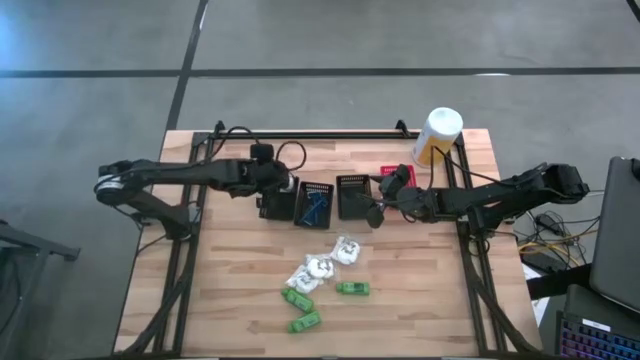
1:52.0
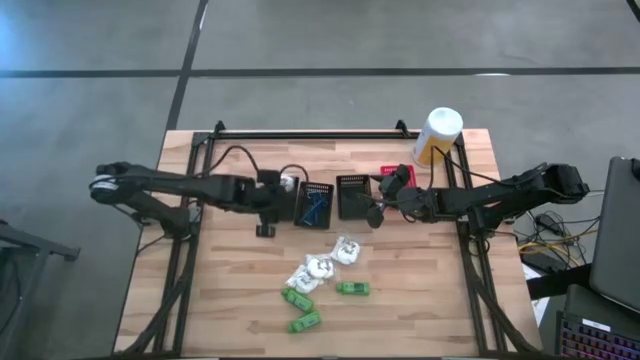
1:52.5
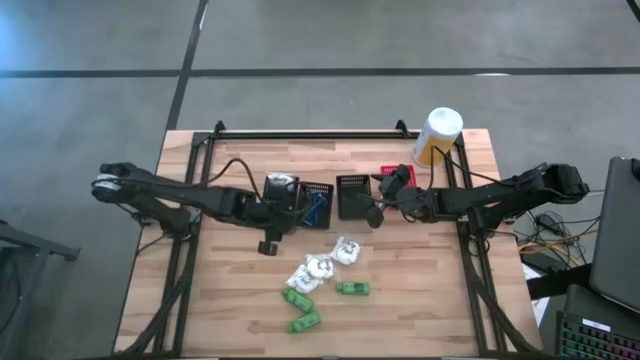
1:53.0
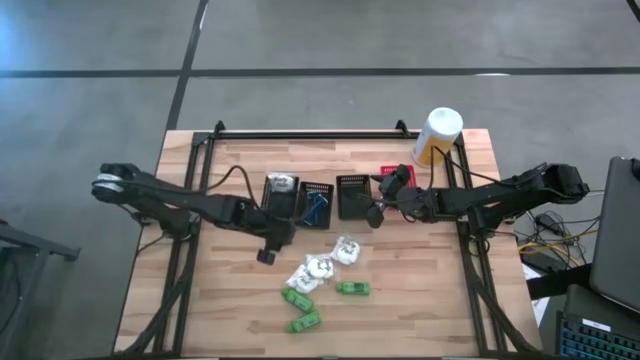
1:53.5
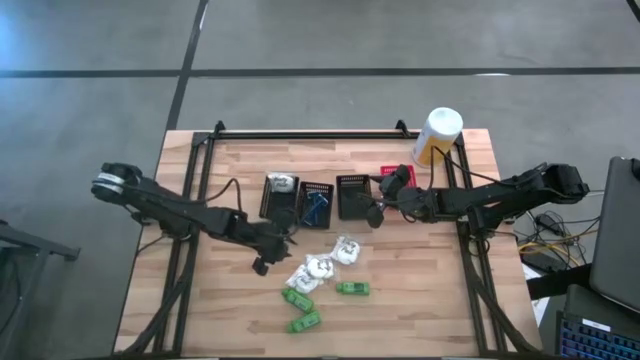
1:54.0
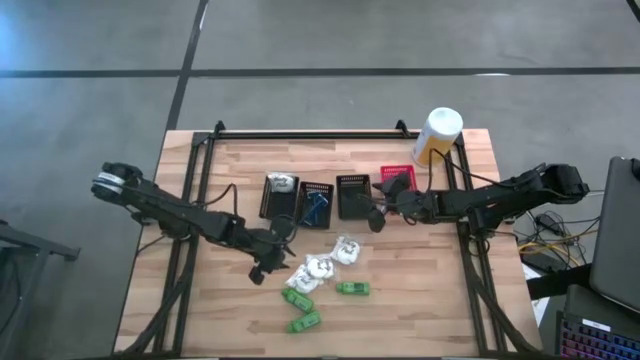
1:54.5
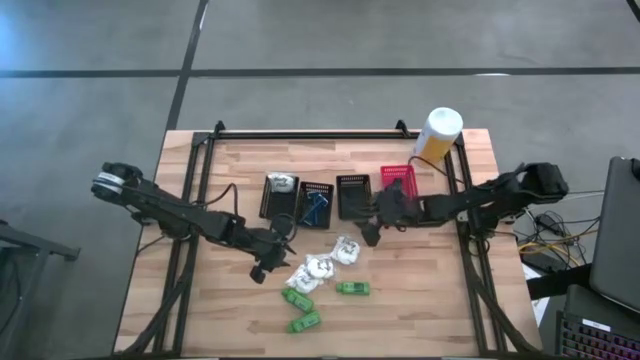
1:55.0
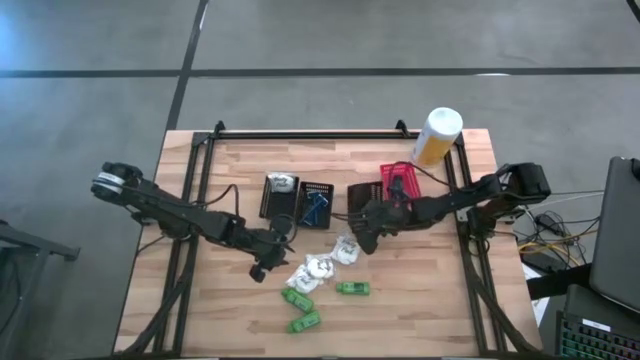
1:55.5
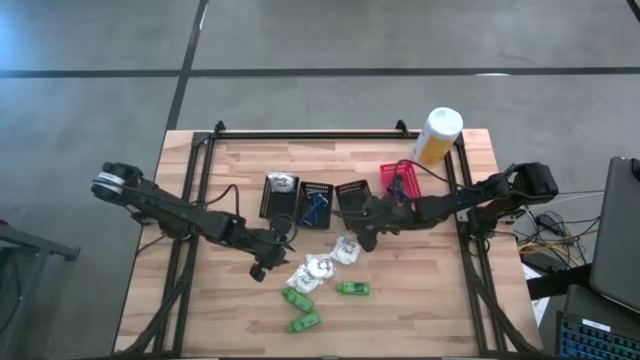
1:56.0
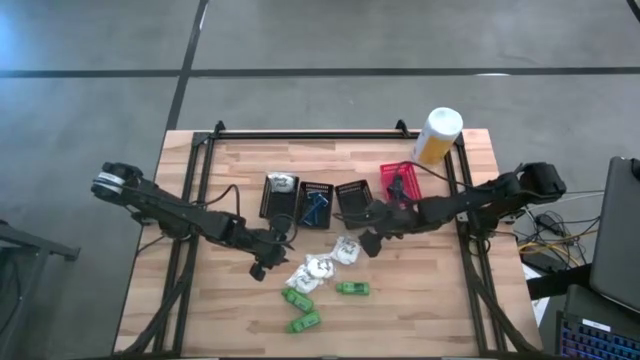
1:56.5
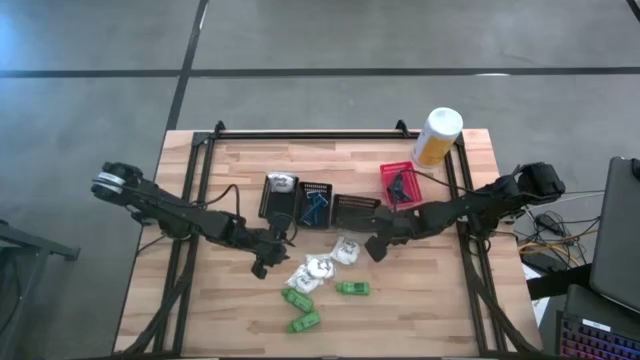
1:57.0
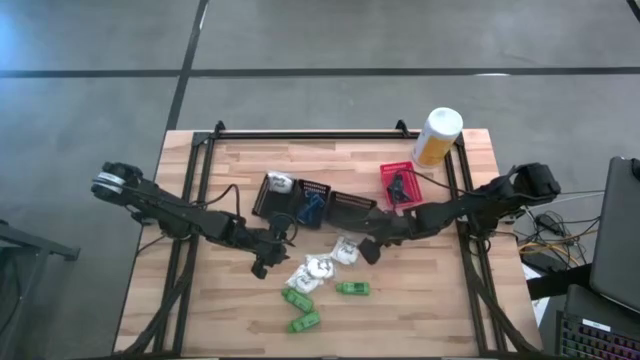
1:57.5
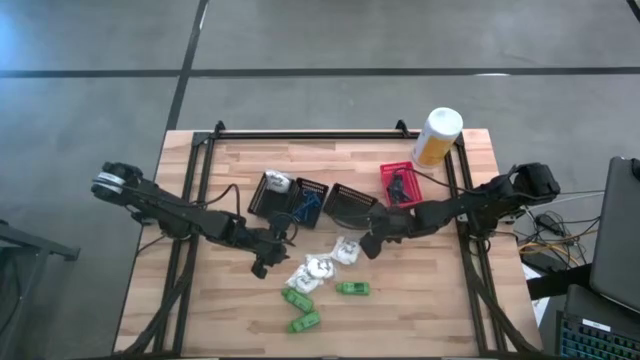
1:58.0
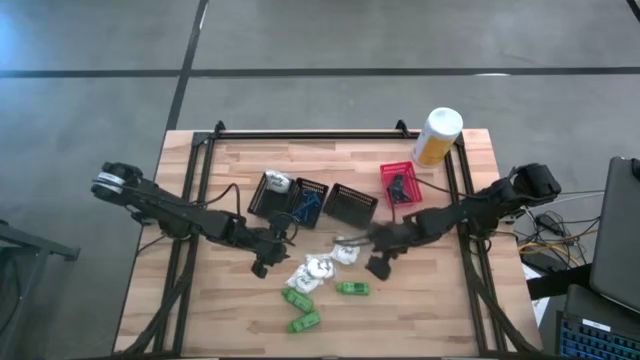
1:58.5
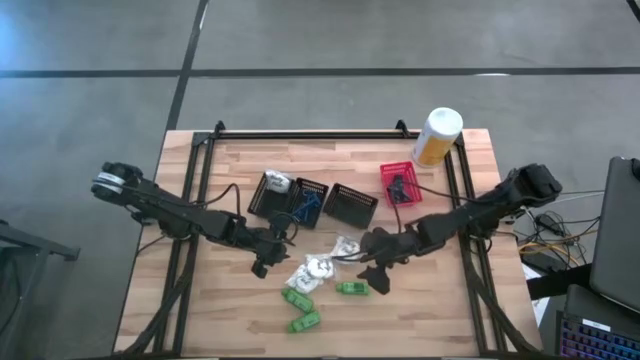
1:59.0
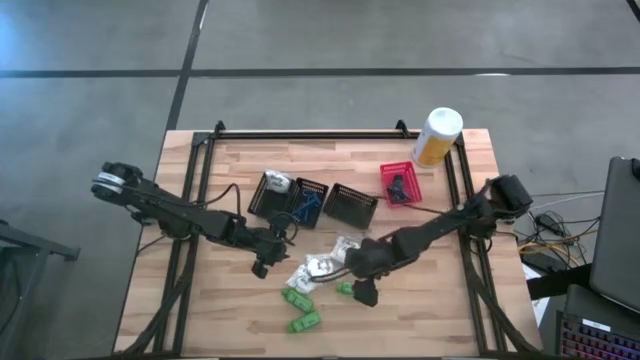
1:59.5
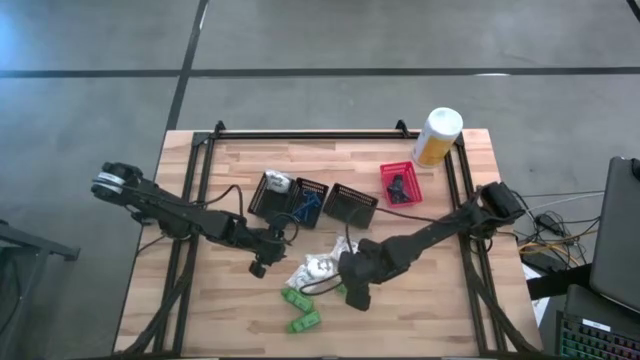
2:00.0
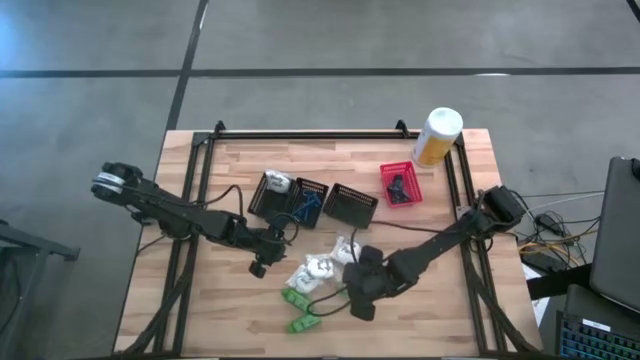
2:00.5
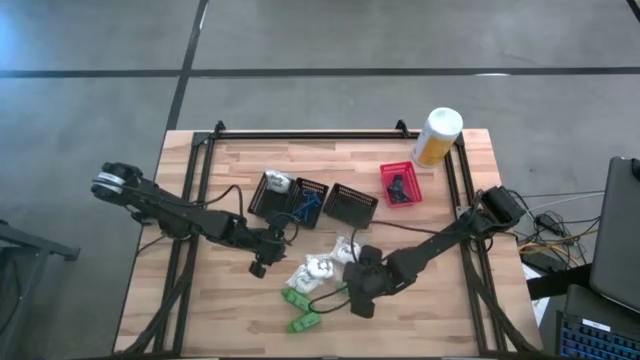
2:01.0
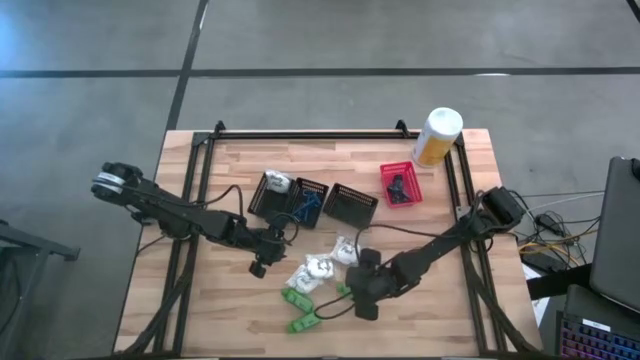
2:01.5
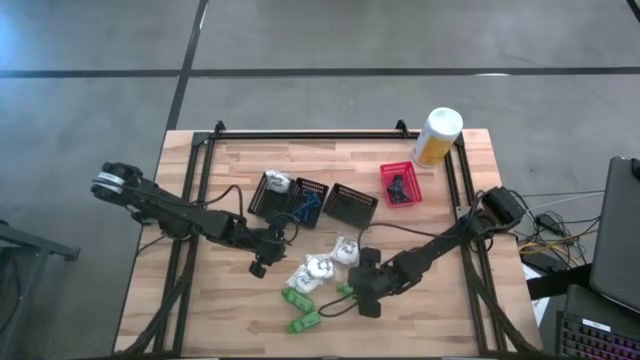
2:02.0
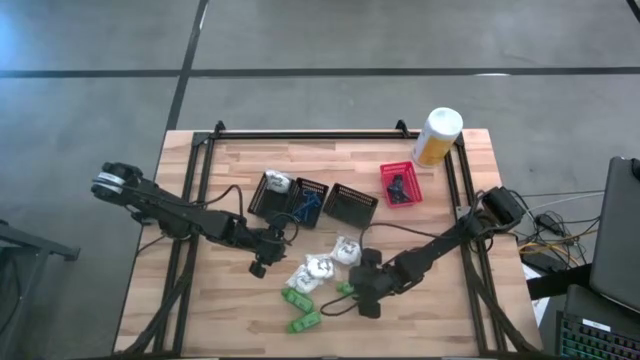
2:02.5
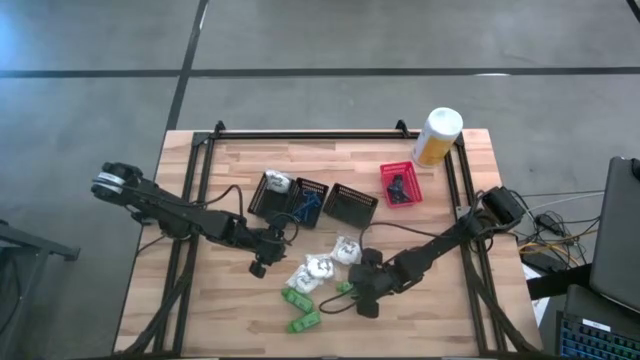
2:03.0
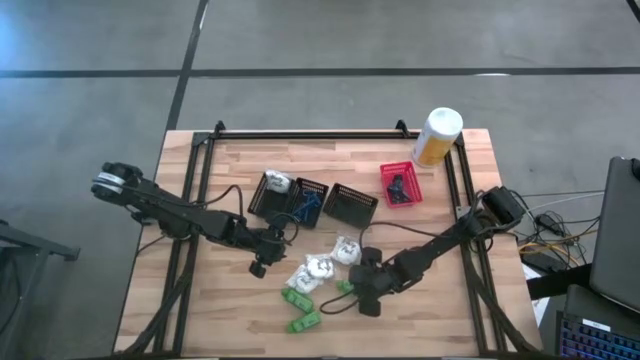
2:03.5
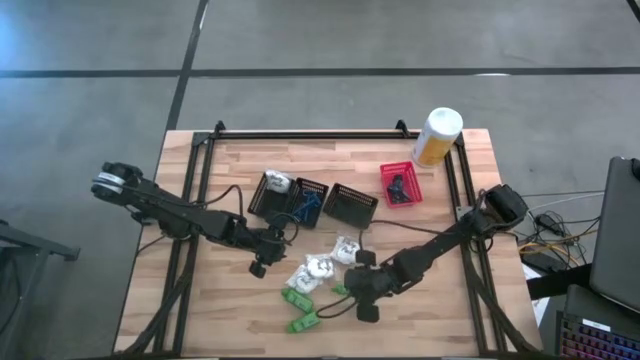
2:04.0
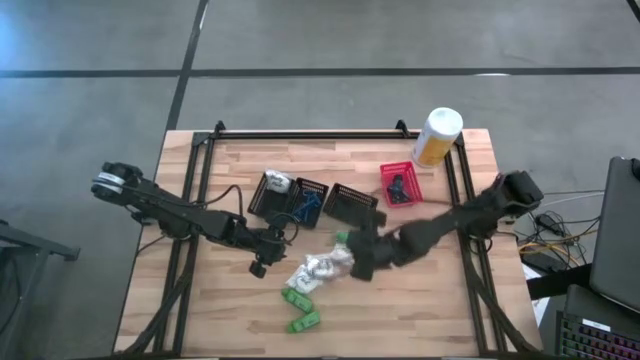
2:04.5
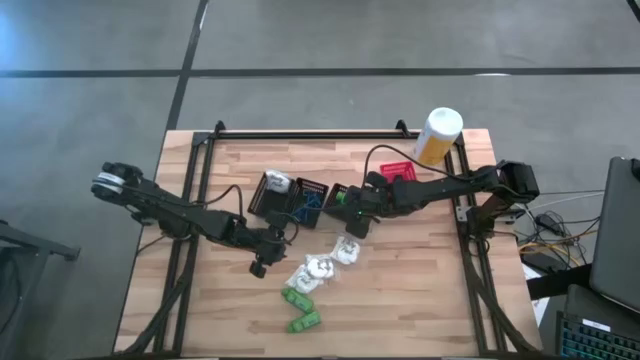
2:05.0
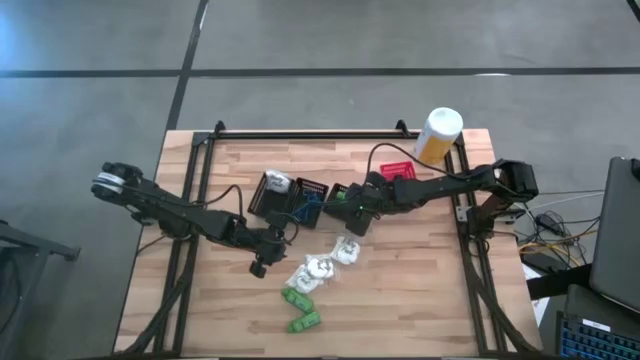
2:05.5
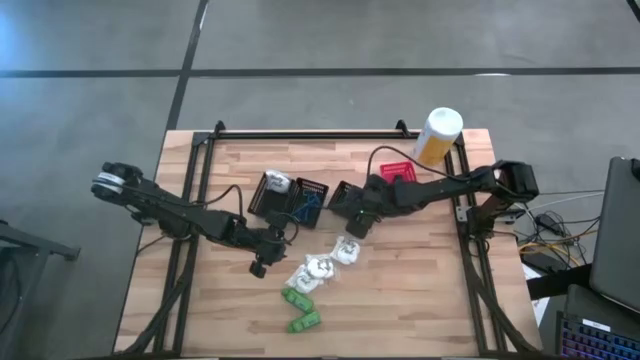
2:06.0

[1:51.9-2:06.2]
Task: Pick & Place Travel size toiletries
Put the right green shampoo into the right black bin

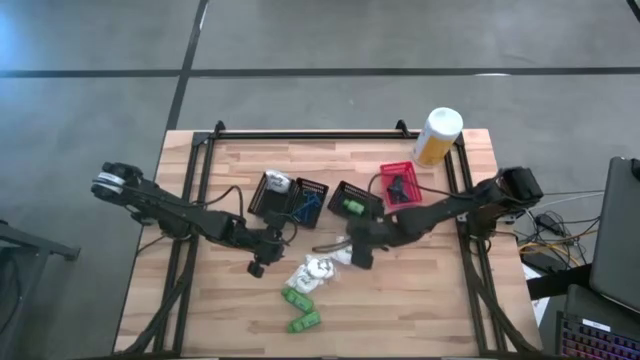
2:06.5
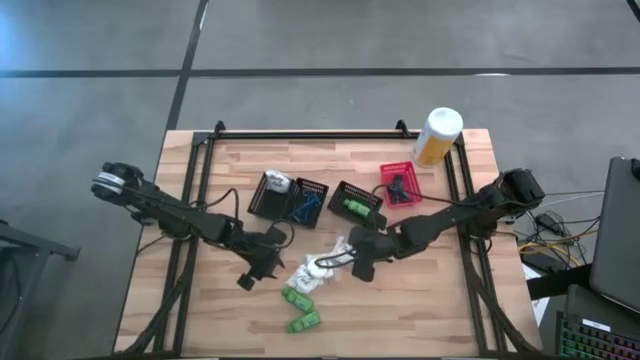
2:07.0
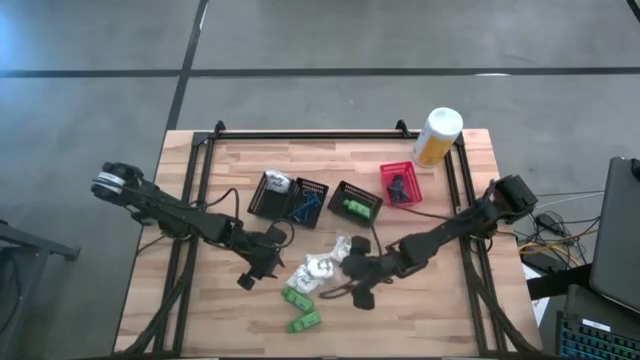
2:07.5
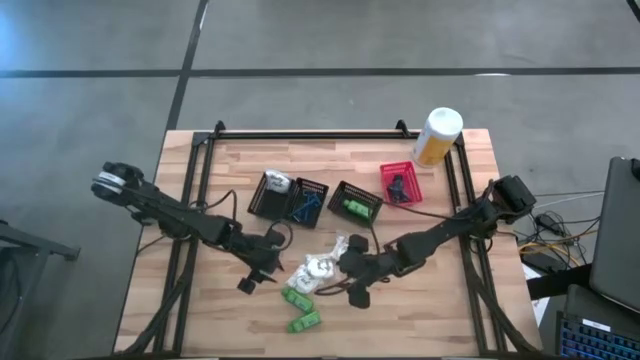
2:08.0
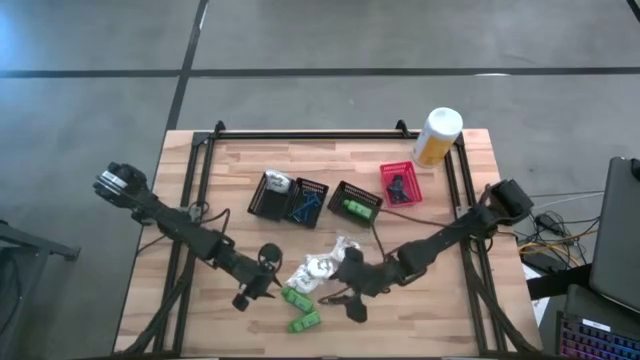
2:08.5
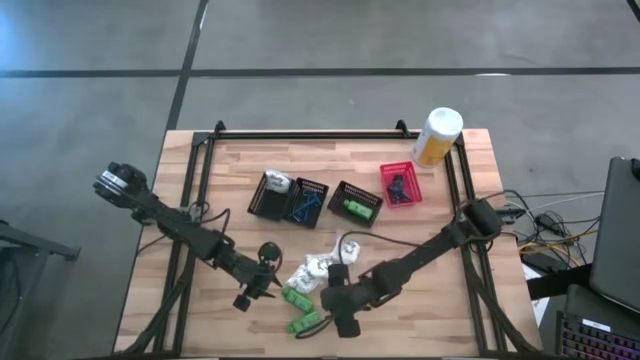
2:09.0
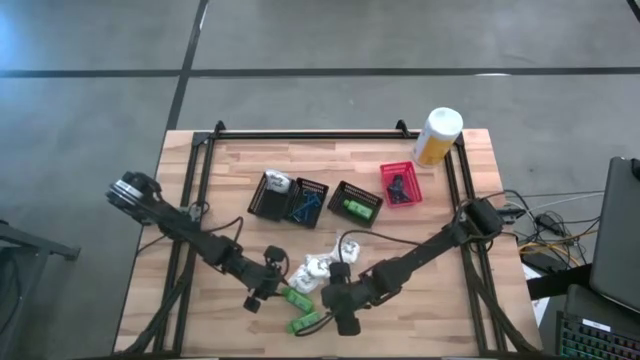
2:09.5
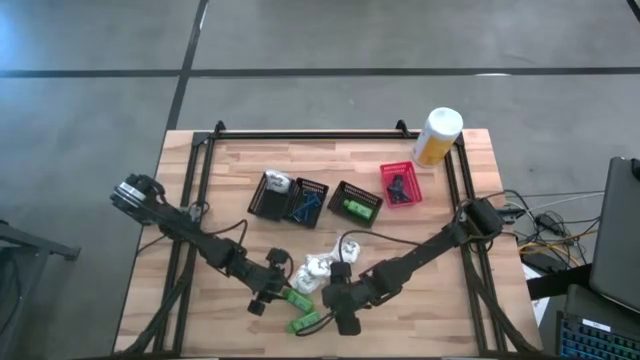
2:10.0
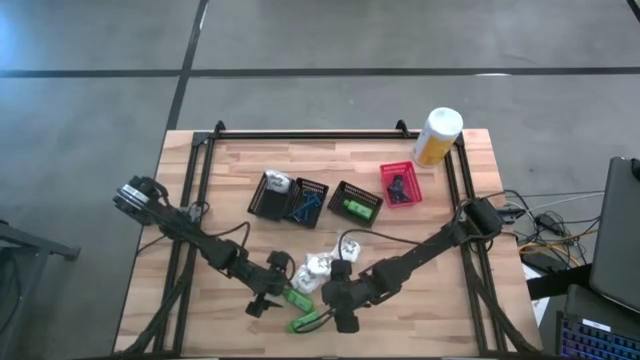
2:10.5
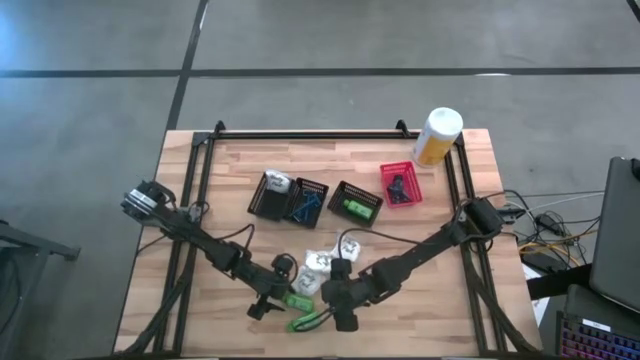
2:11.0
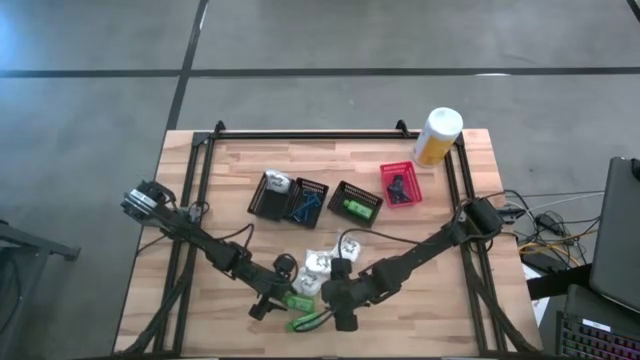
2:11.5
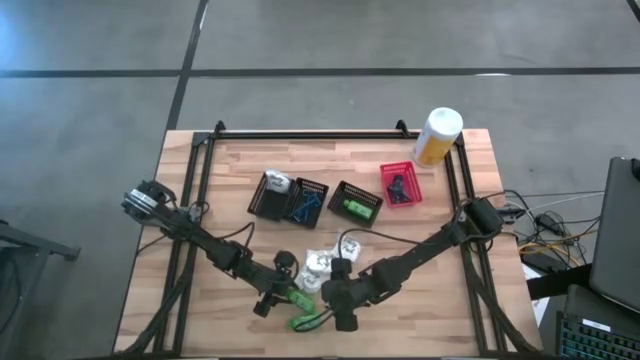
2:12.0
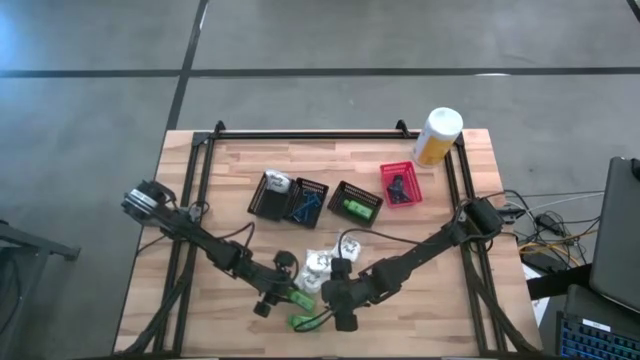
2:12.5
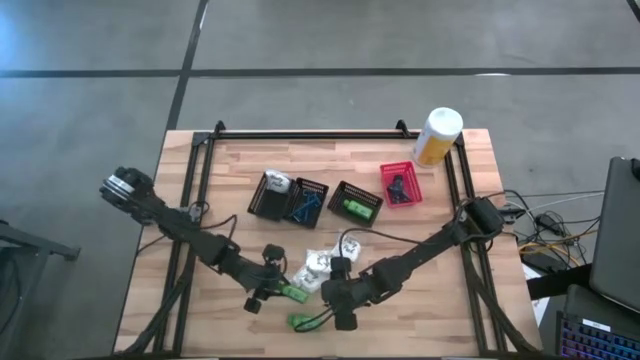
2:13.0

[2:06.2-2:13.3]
Put the top left green shampoo into the right black bin
